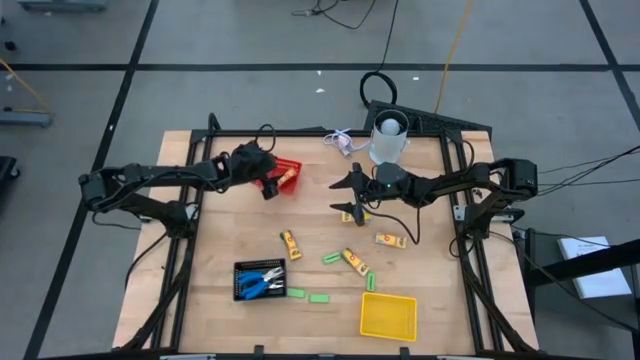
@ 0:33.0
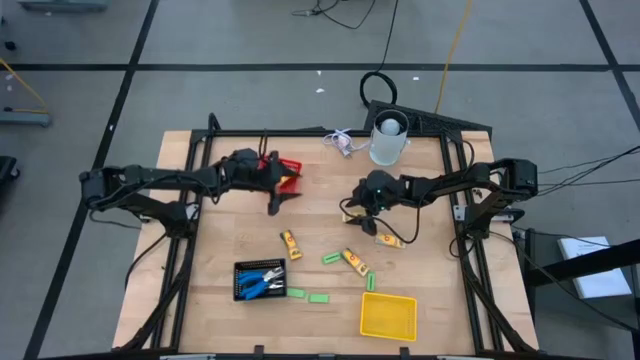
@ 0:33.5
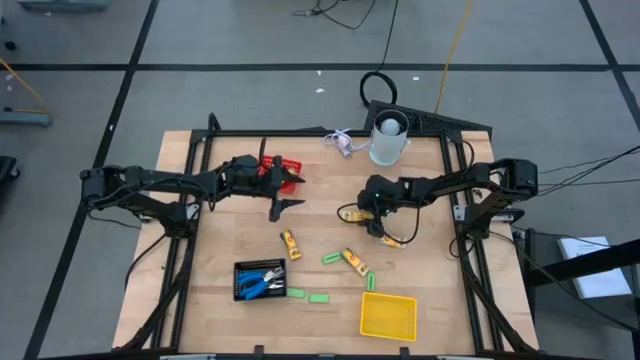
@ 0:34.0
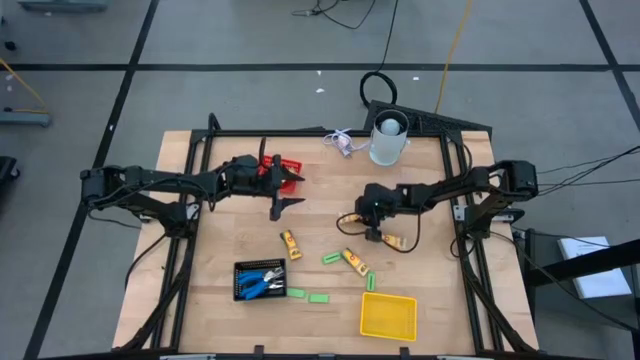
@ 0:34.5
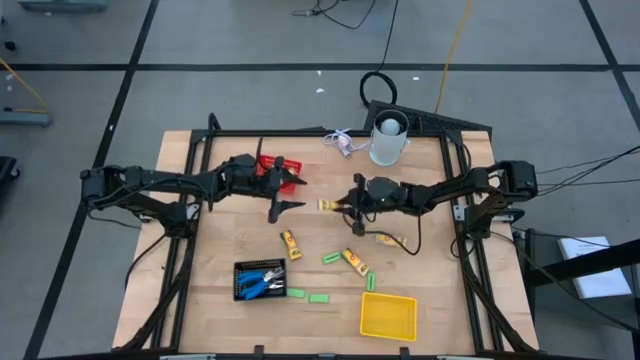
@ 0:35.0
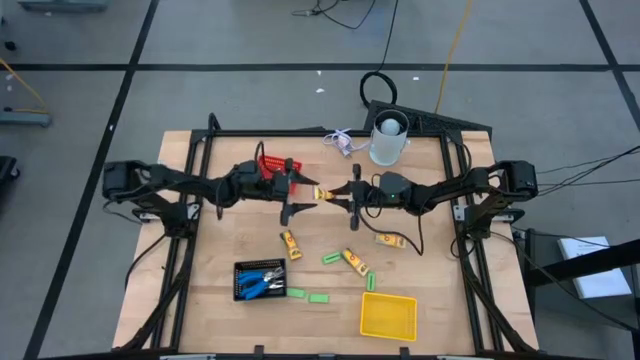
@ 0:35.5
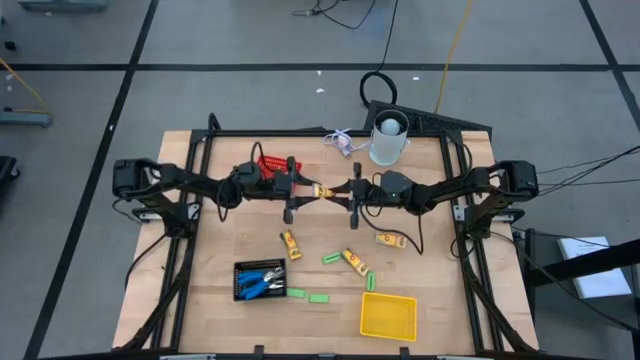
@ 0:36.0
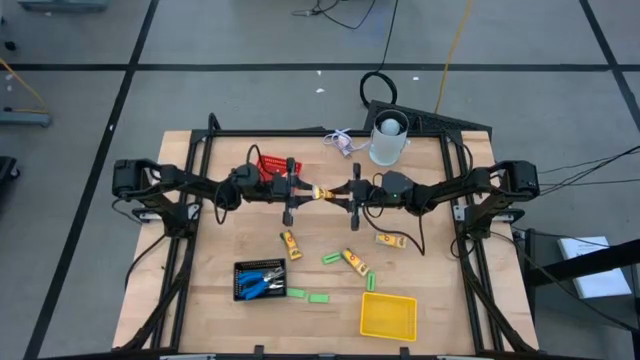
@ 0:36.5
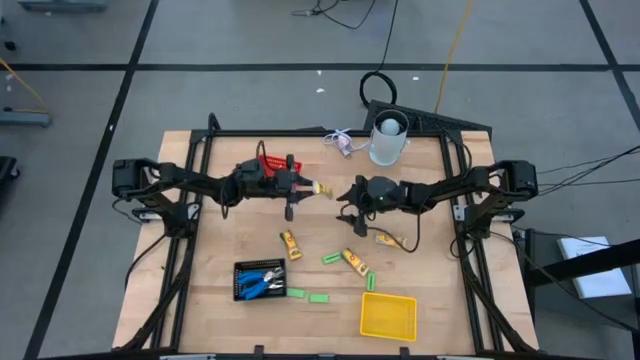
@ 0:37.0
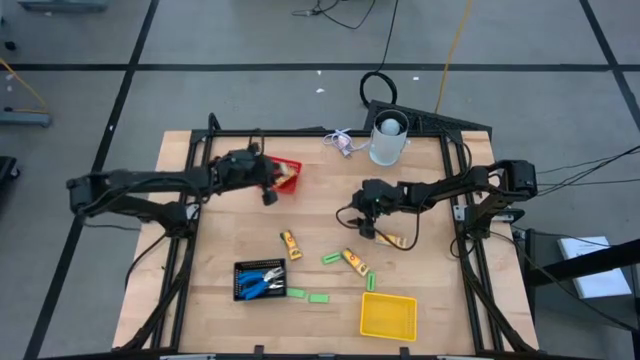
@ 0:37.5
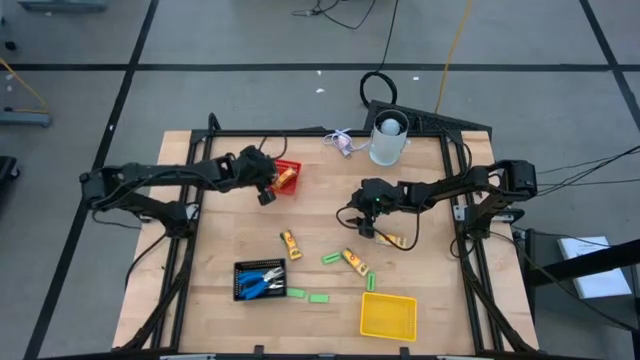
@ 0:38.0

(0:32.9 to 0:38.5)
Task: Pick & Place School Supplies
Put the crayon box into the red bin

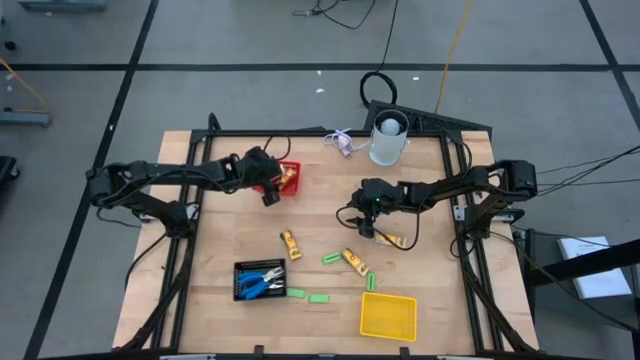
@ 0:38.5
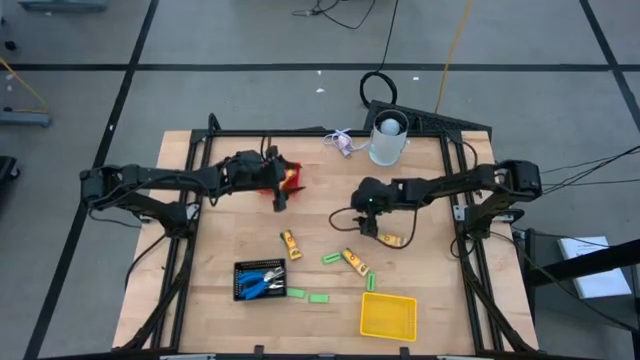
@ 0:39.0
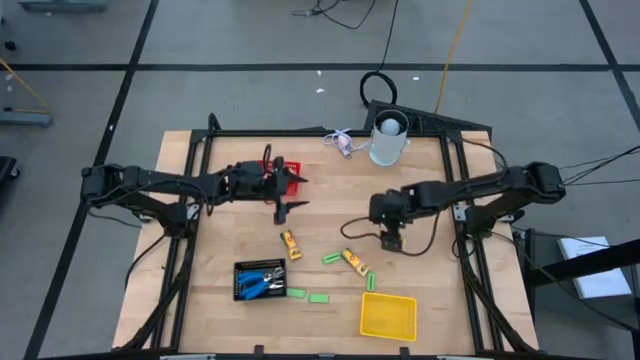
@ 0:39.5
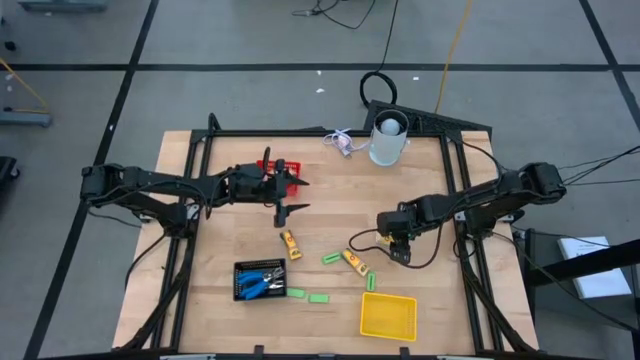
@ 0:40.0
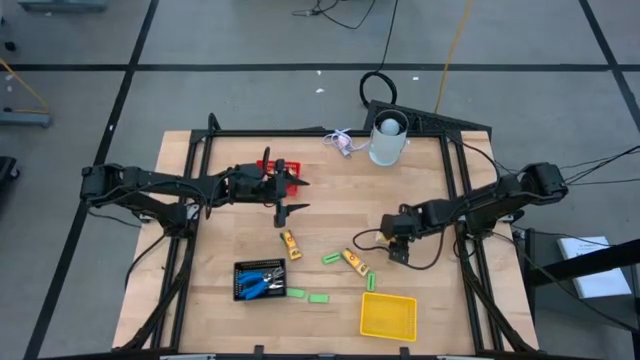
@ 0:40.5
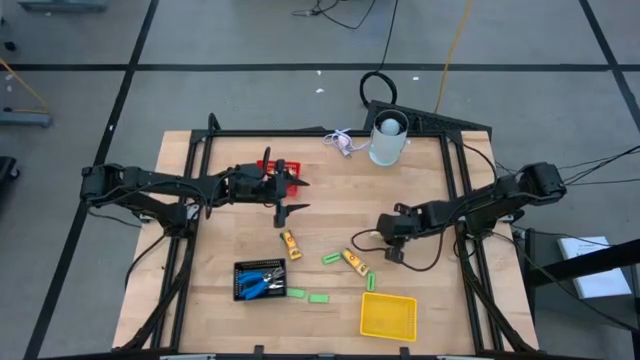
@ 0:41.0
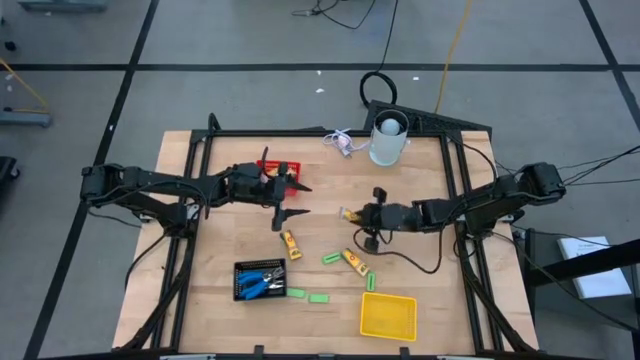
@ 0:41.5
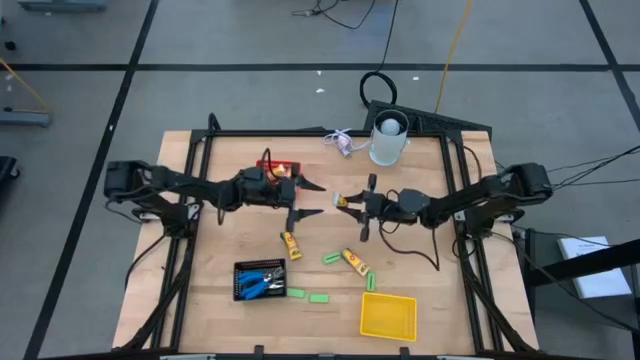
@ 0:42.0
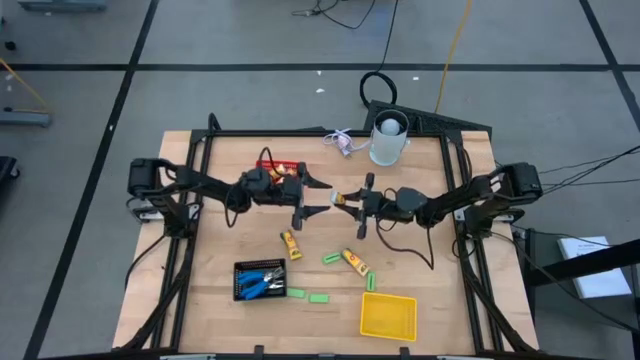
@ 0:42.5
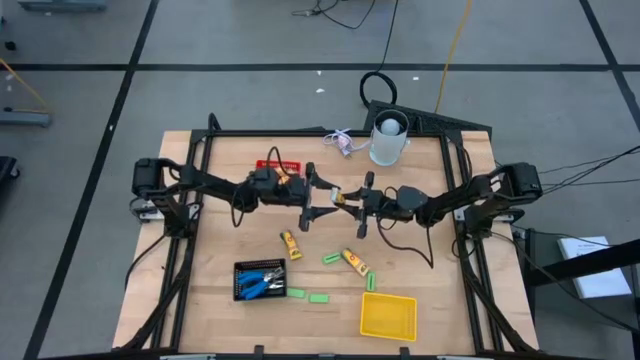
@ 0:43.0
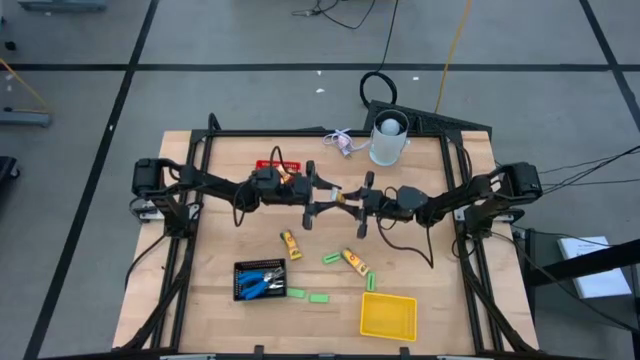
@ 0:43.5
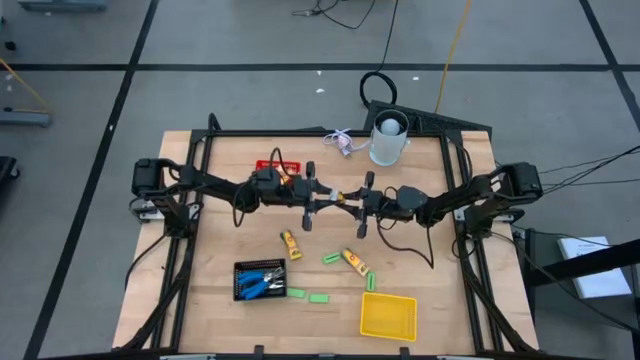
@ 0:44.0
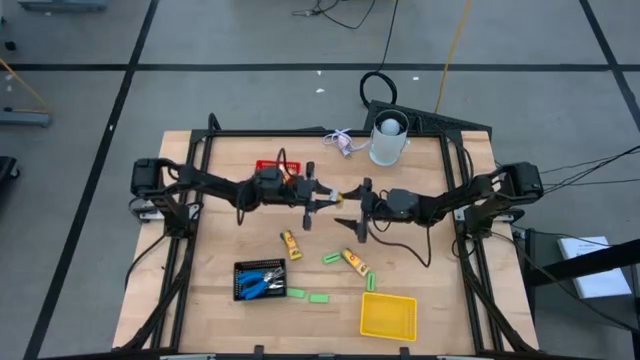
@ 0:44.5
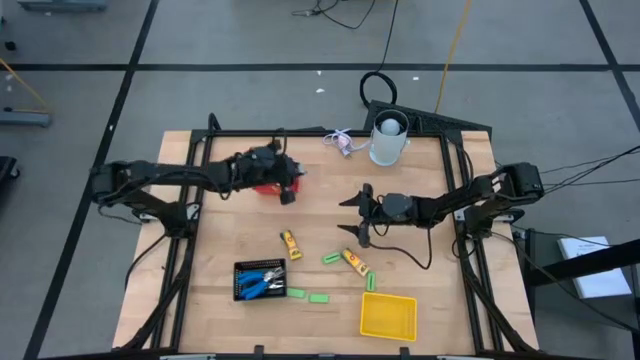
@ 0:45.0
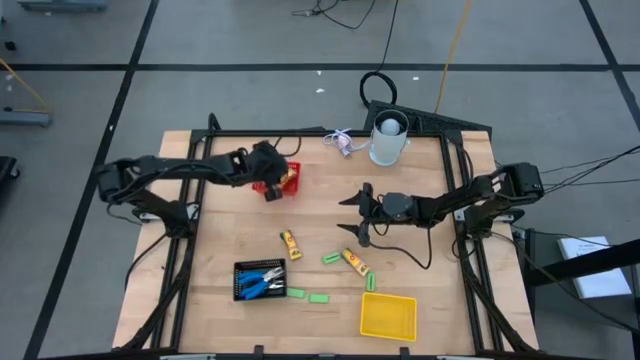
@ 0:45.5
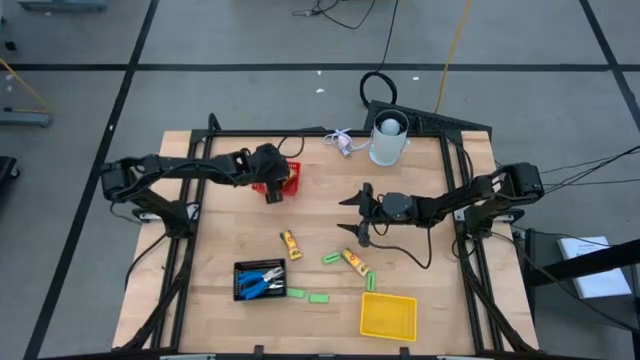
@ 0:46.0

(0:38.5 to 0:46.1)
Put the crayon box into the red bin

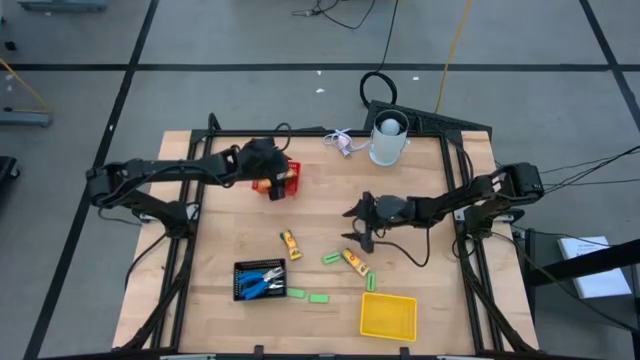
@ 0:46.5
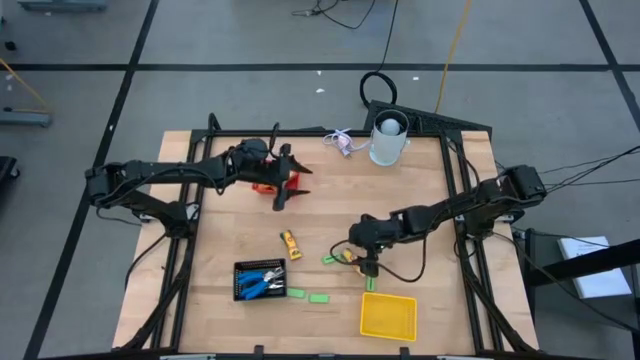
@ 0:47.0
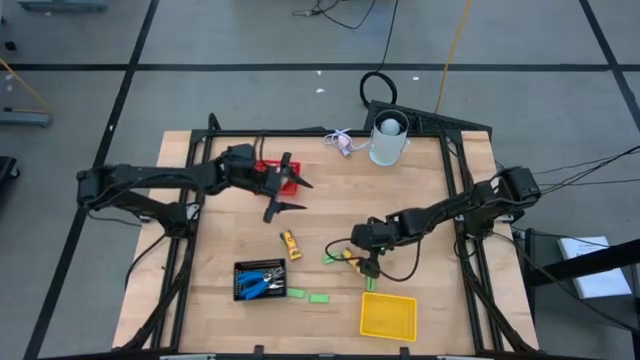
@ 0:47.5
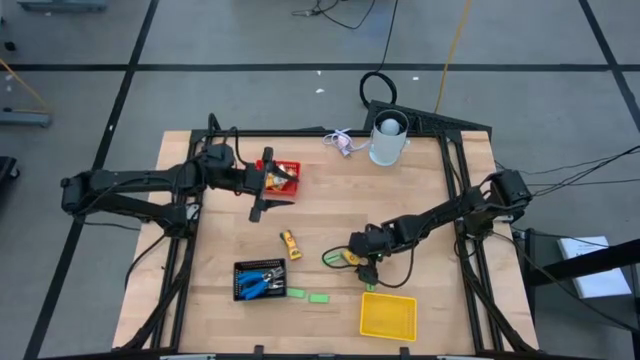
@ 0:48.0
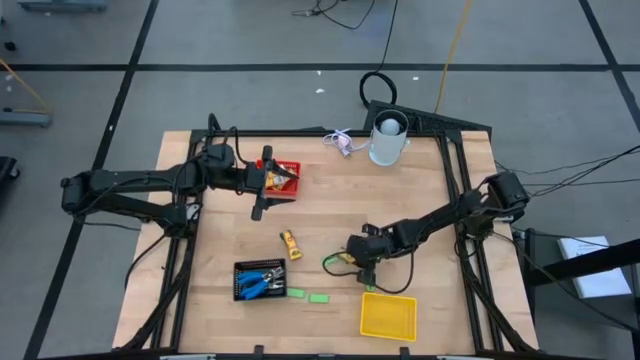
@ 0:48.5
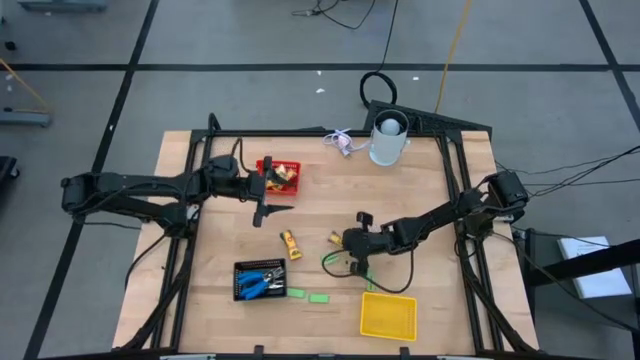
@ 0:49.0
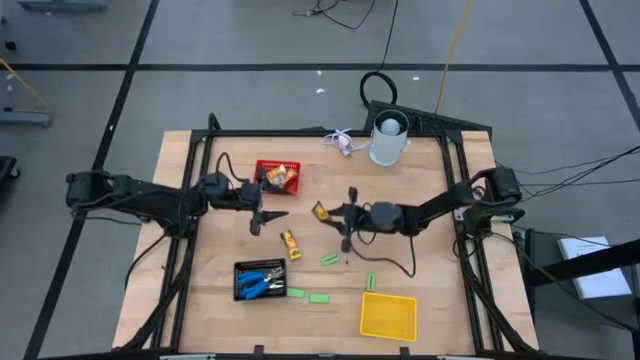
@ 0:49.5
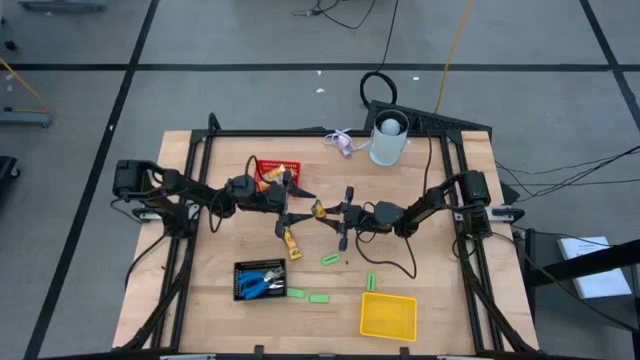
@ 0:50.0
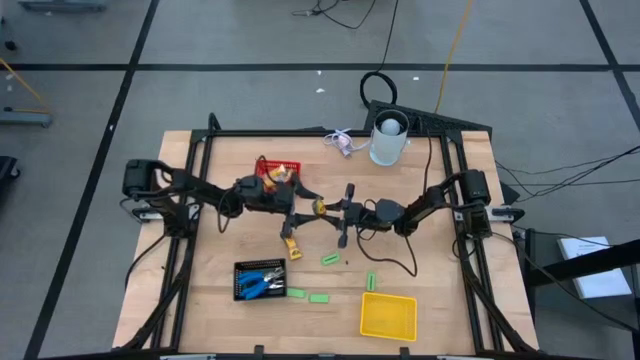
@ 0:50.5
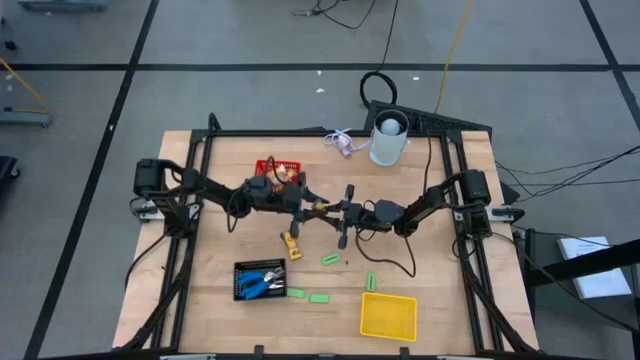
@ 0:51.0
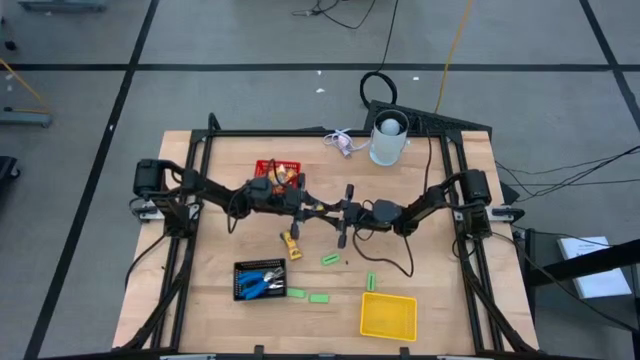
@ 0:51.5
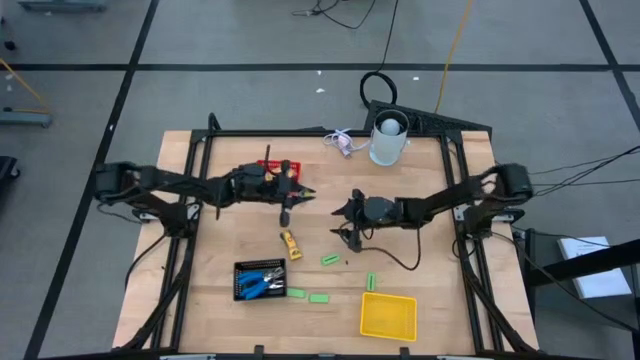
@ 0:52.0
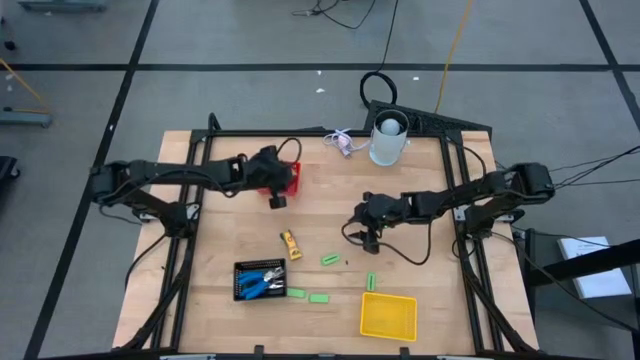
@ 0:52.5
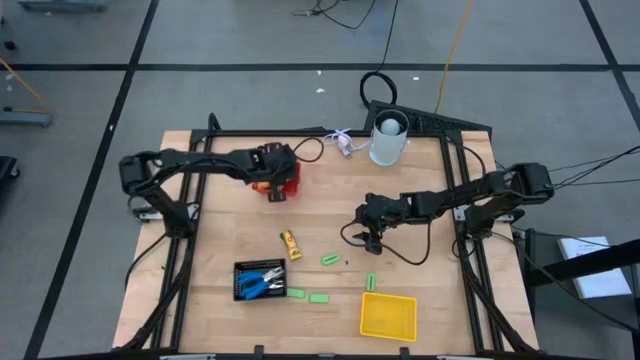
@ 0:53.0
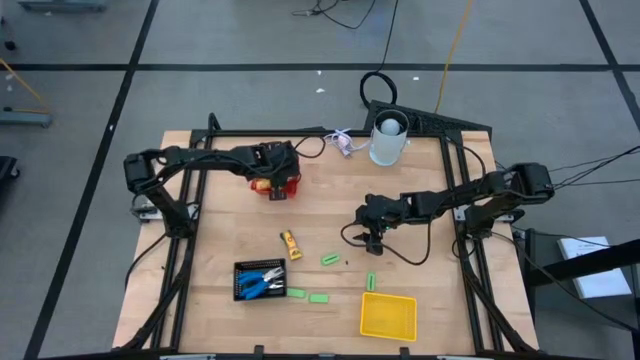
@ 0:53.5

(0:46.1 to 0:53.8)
Put the crayon box into the red bin
